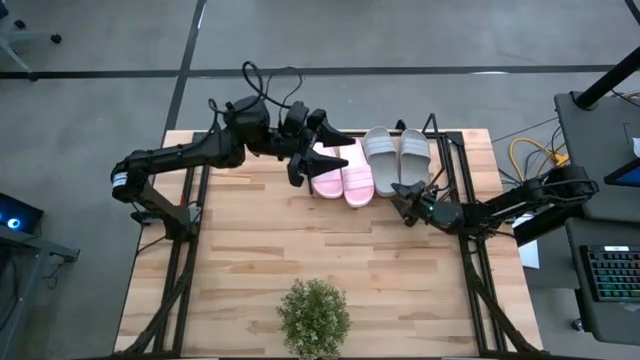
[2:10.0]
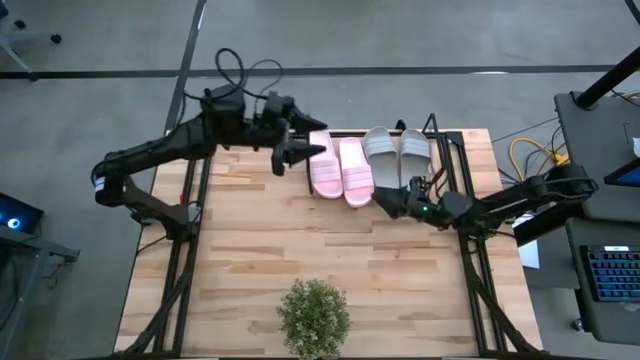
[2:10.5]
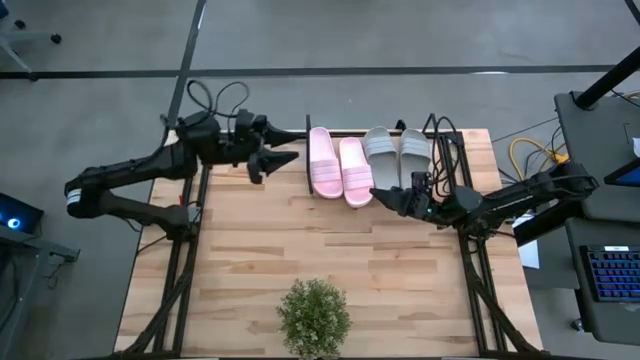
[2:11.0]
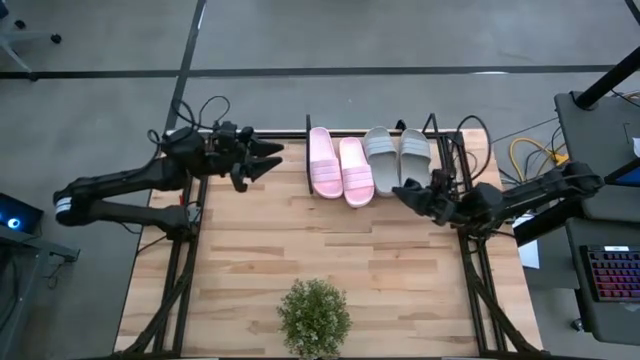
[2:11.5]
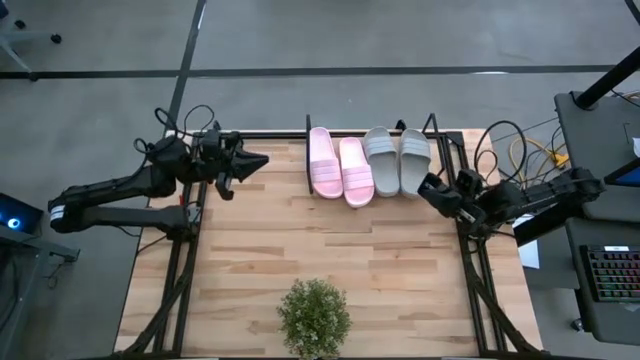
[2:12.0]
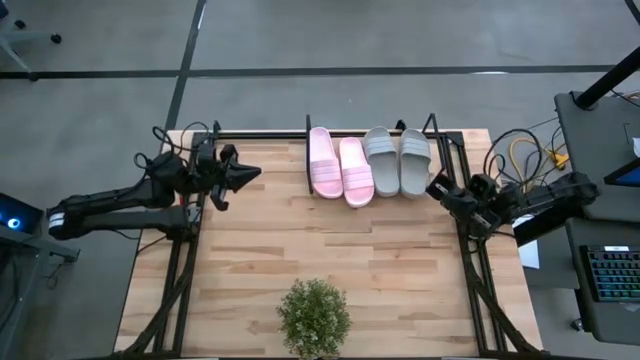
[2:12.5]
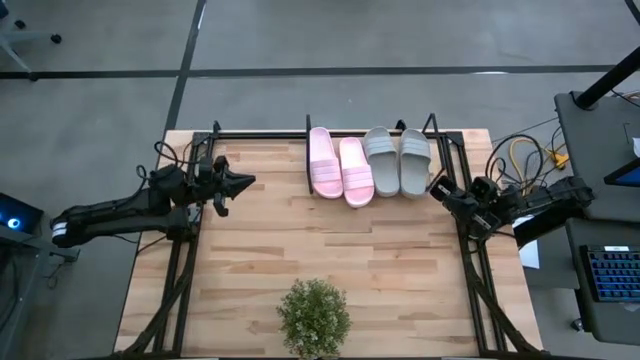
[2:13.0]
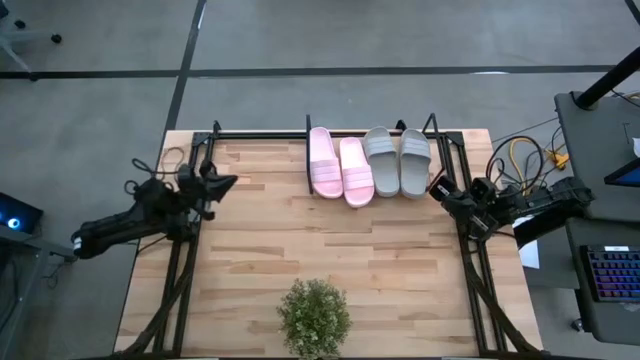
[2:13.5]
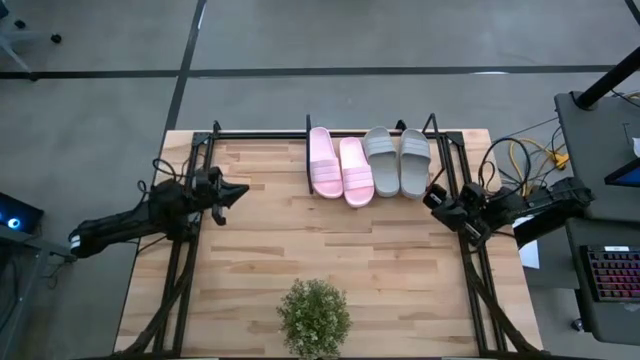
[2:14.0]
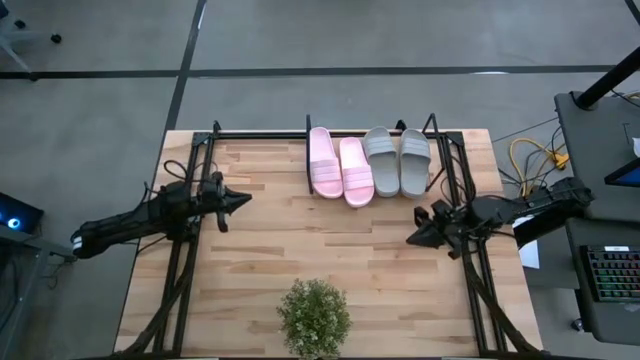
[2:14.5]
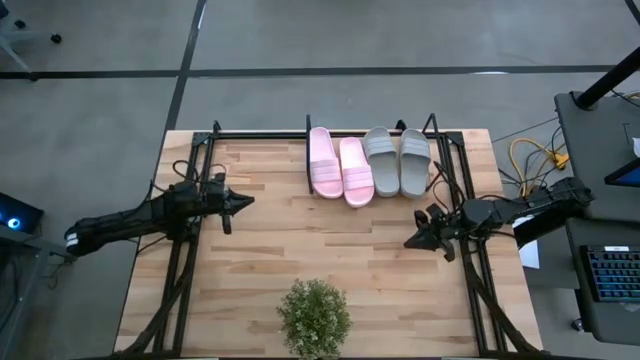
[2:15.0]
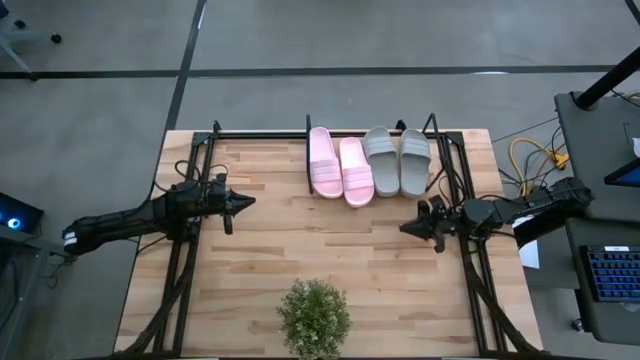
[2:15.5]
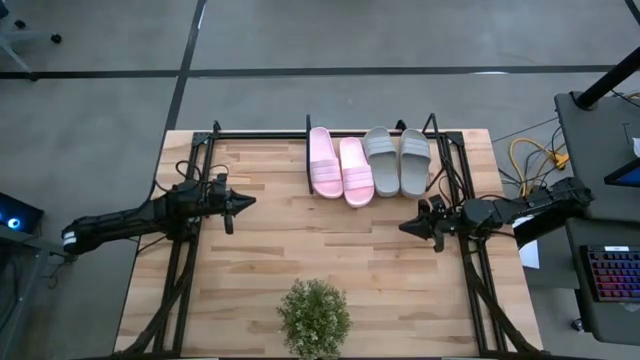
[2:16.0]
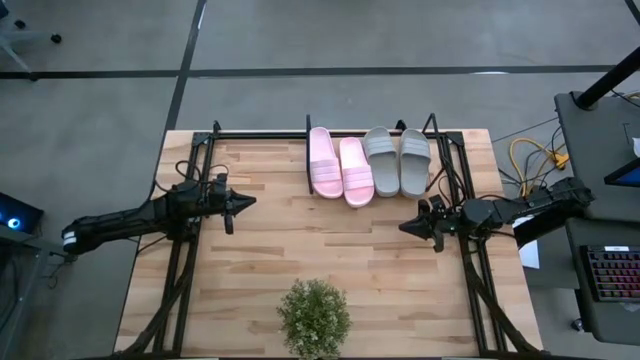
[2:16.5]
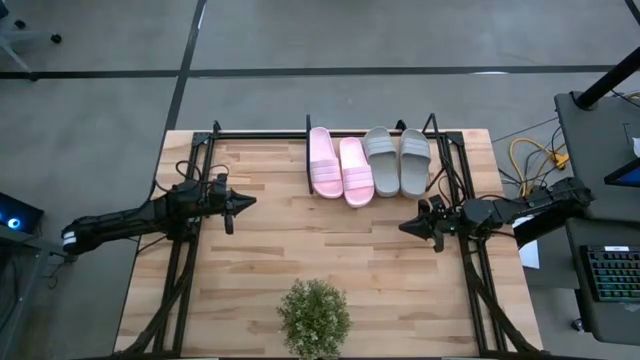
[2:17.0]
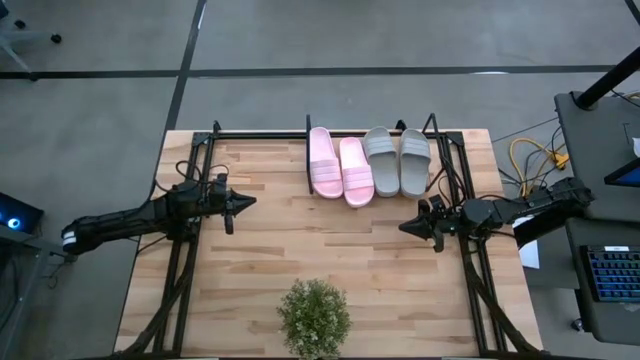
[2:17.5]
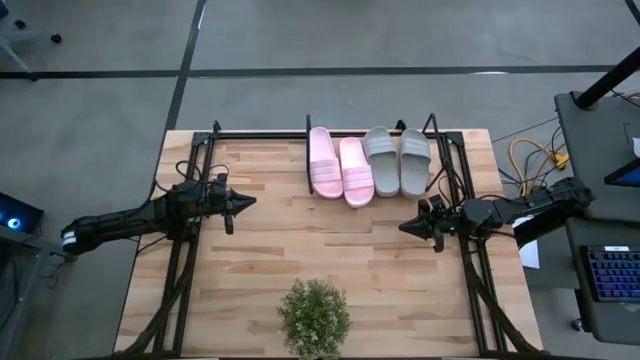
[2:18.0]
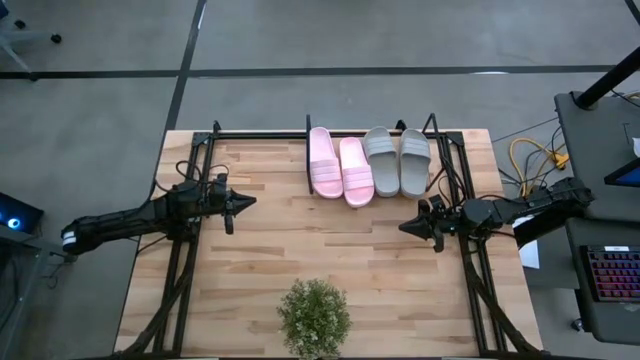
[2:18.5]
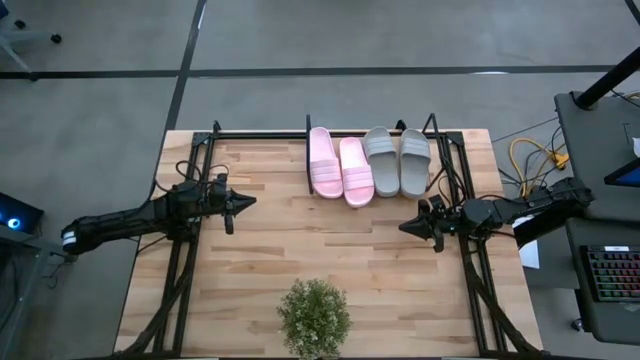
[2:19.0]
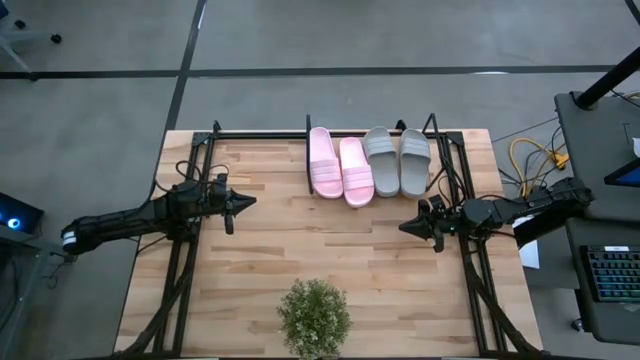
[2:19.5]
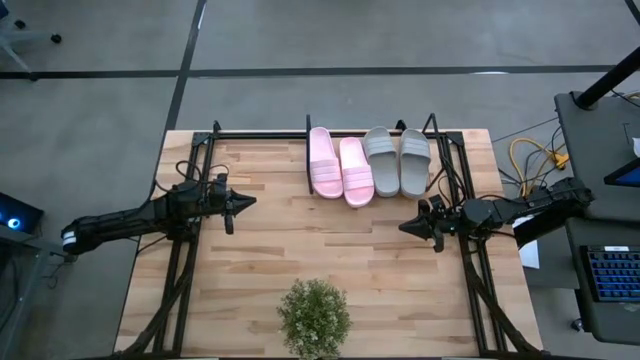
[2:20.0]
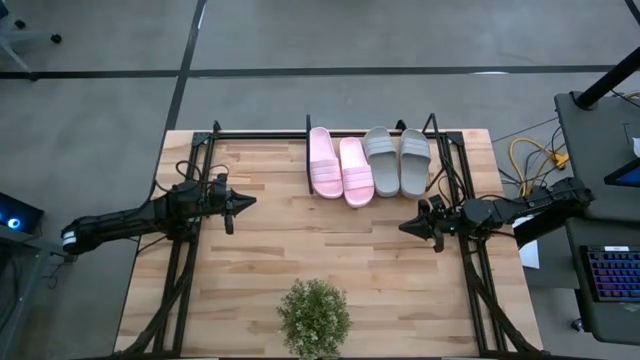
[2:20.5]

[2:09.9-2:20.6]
Task: Pick and place slides into the shelf
Return to Home Position

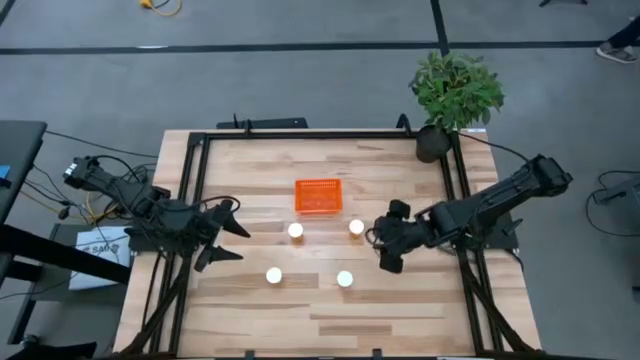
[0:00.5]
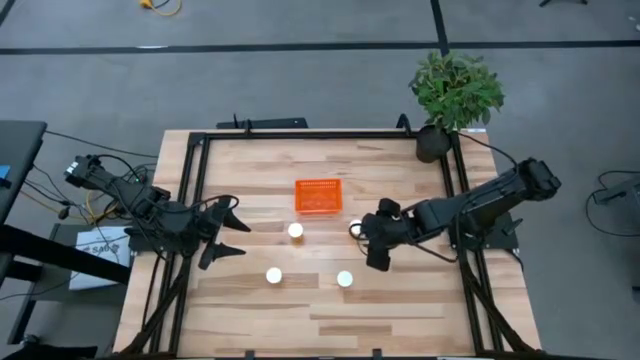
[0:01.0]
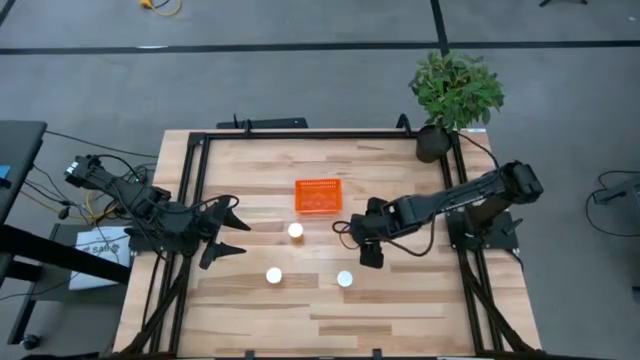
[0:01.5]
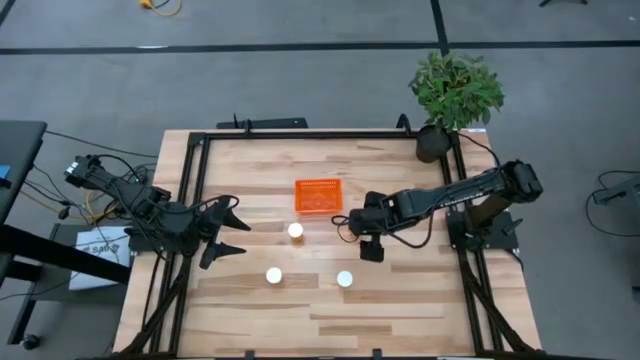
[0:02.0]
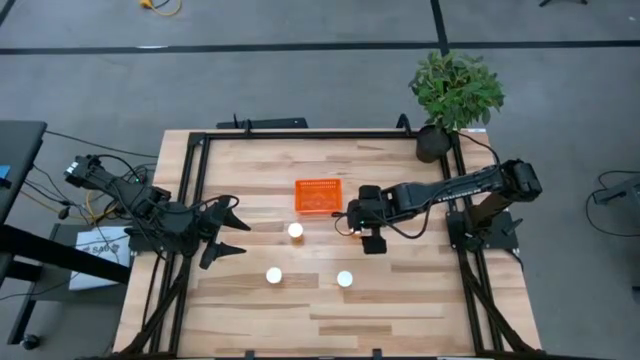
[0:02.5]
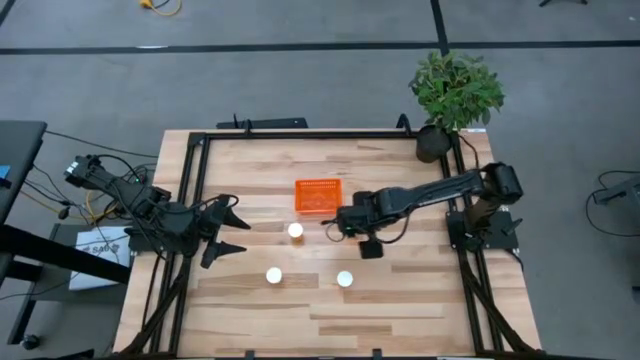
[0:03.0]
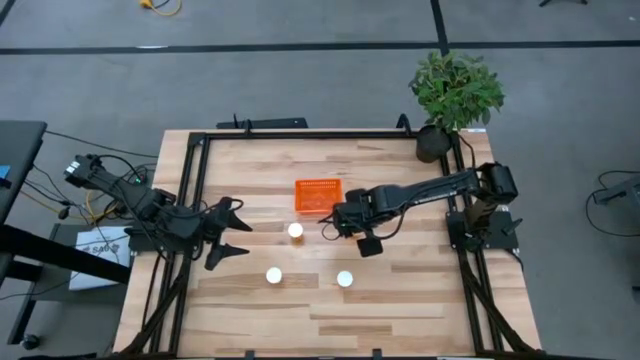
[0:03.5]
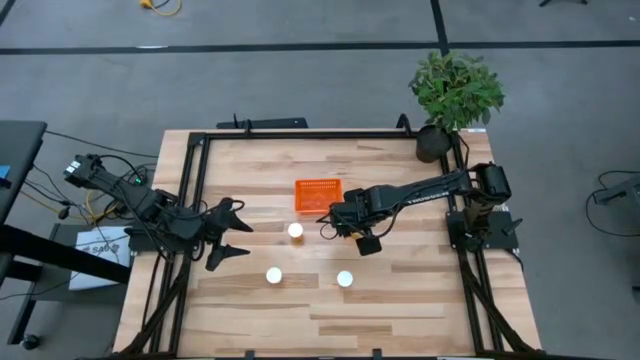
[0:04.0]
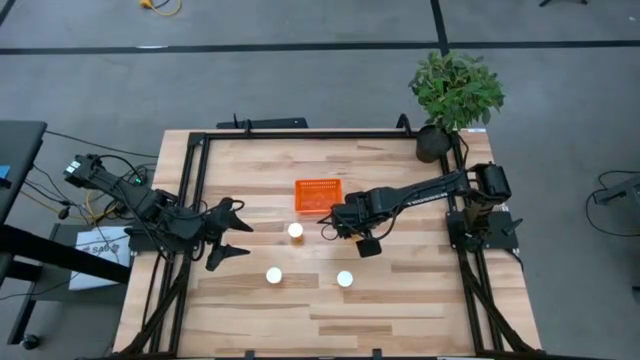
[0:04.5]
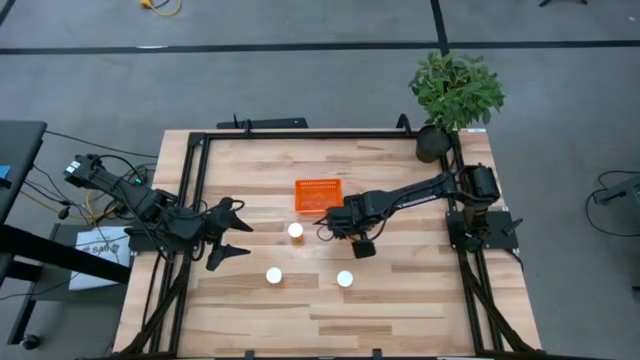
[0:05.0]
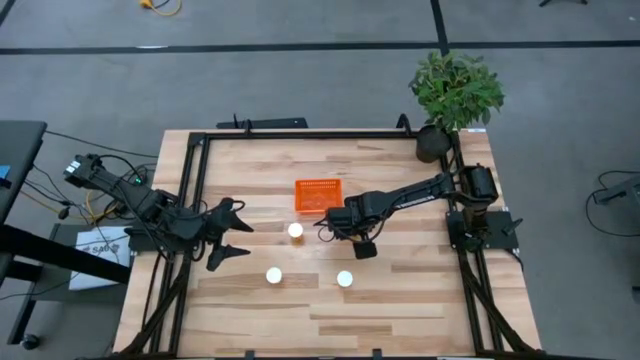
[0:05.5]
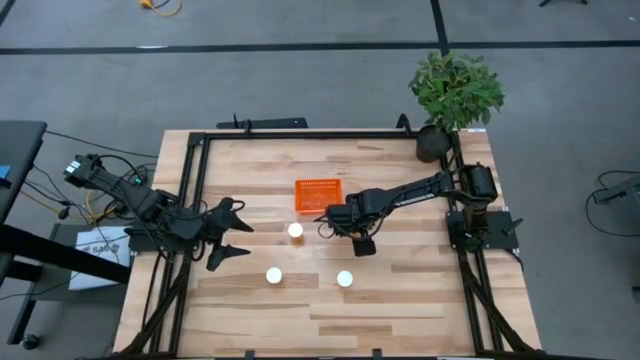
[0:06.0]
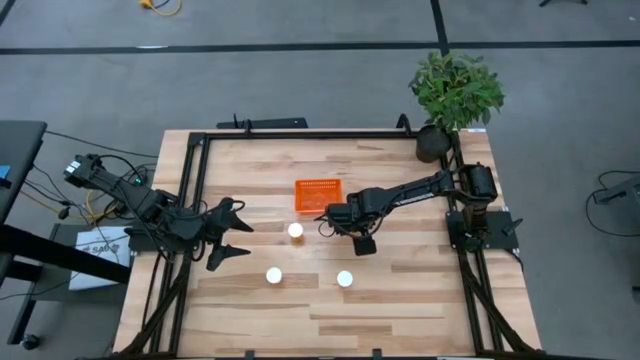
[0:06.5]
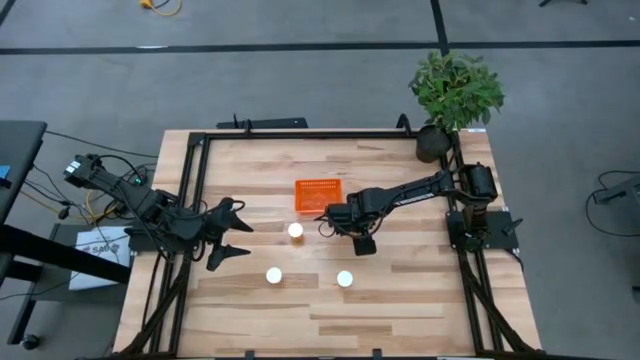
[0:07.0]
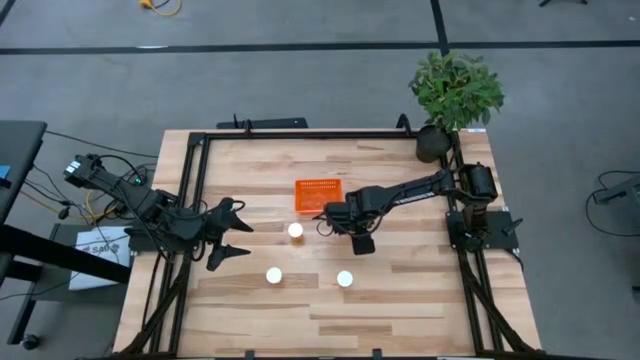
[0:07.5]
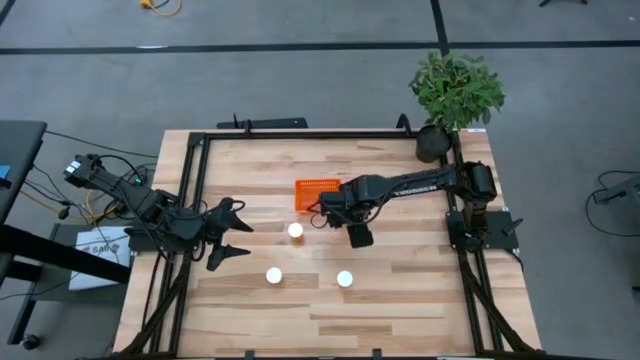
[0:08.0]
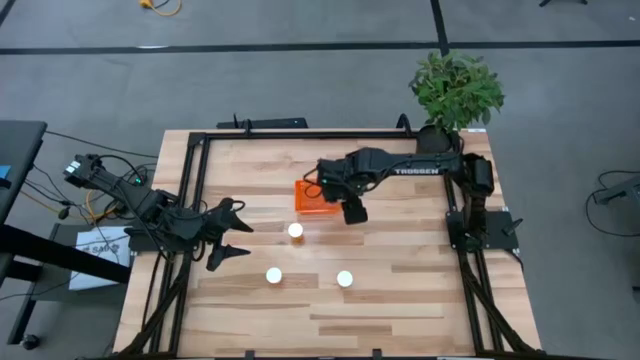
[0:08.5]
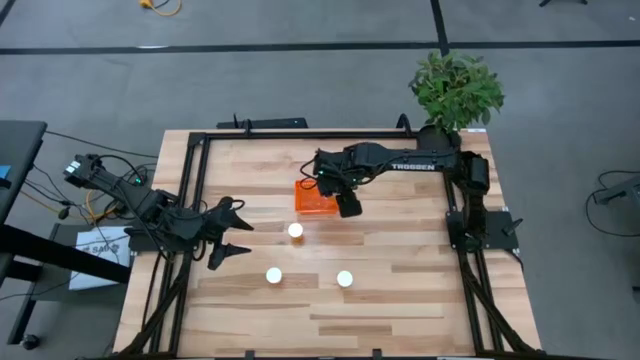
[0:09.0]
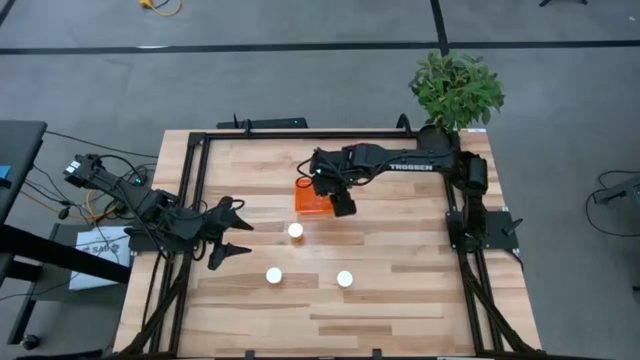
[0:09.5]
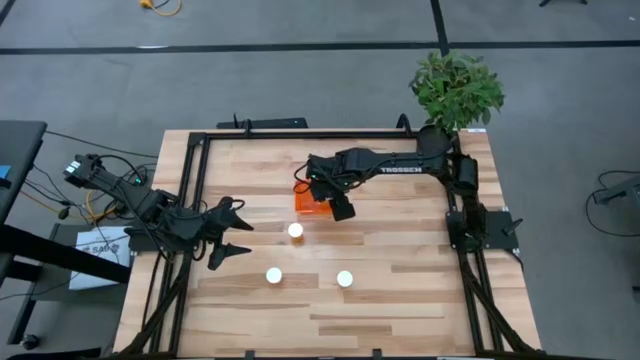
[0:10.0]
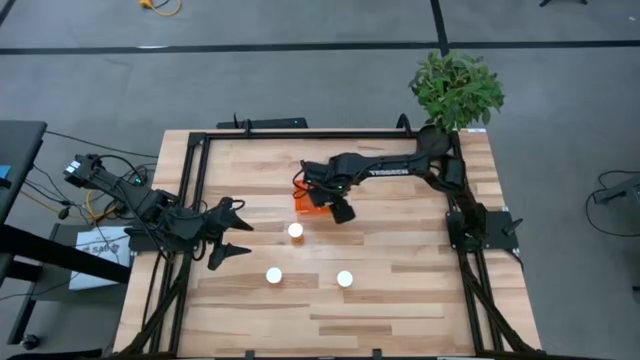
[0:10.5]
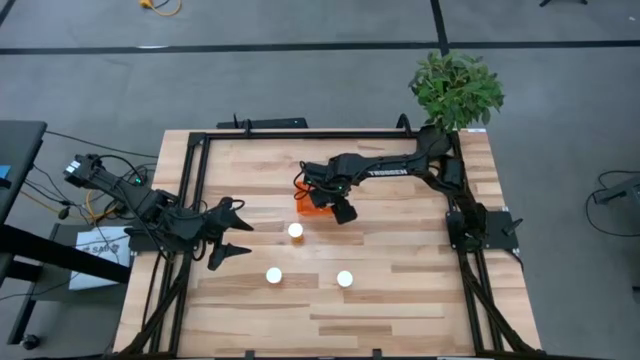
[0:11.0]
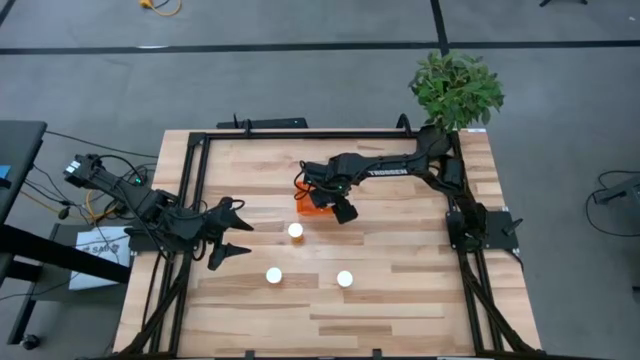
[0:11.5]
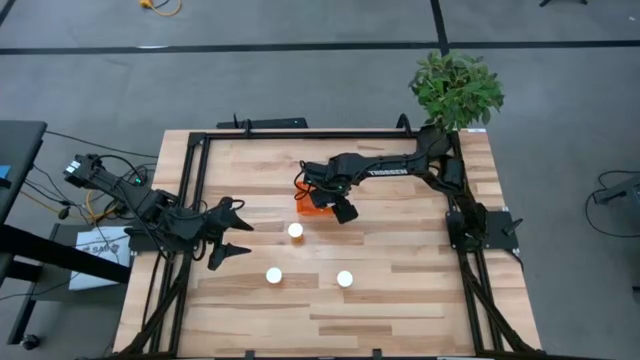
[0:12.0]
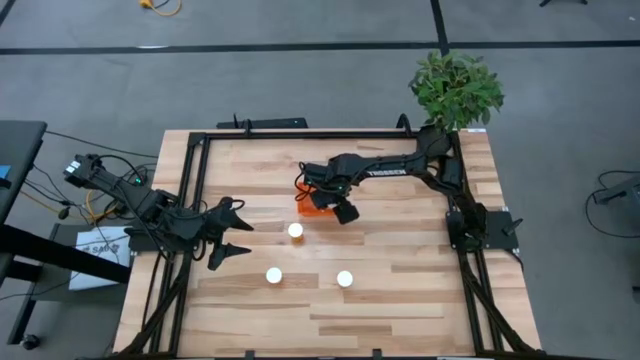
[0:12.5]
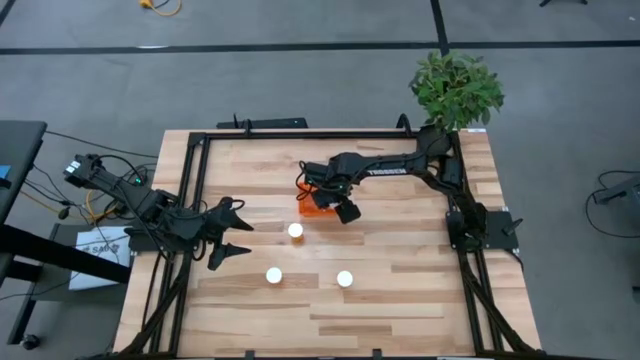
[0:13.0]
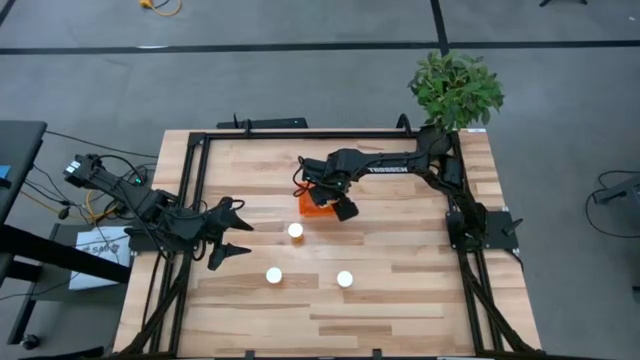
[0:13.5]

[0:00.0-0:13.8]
Task: Pick and place pill bottles into a basket
Put the orange pill bottle into the orange bin
